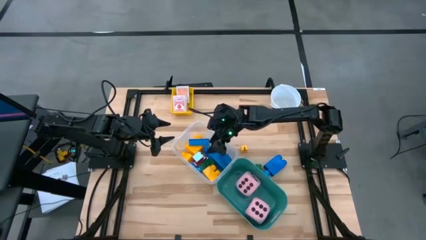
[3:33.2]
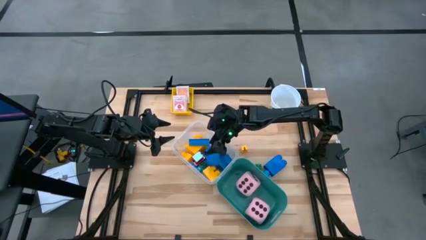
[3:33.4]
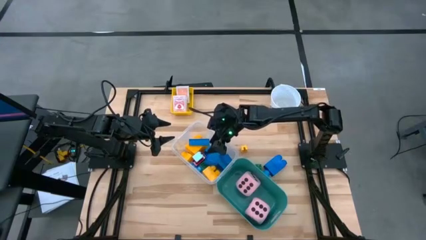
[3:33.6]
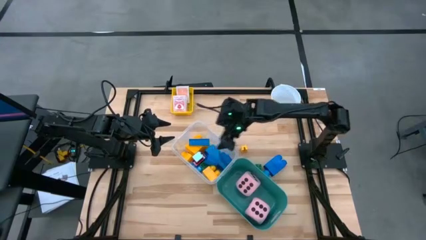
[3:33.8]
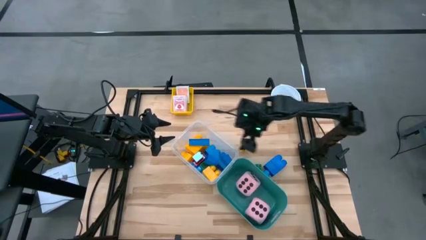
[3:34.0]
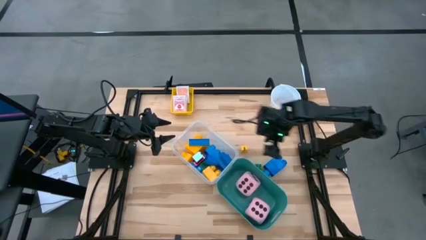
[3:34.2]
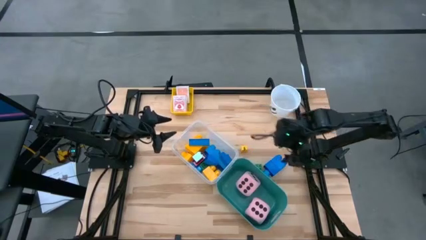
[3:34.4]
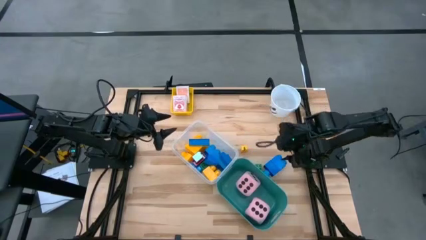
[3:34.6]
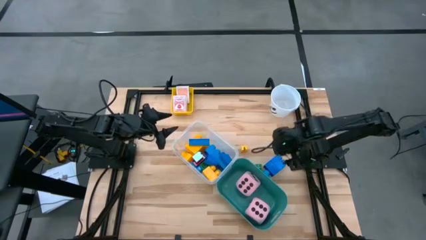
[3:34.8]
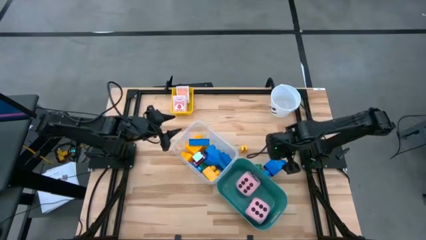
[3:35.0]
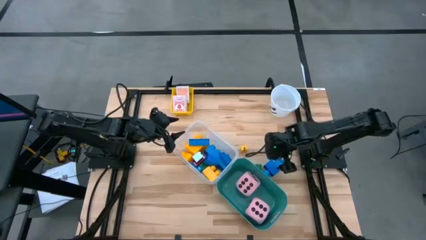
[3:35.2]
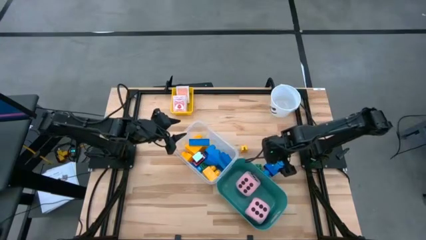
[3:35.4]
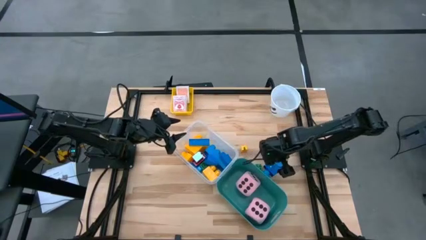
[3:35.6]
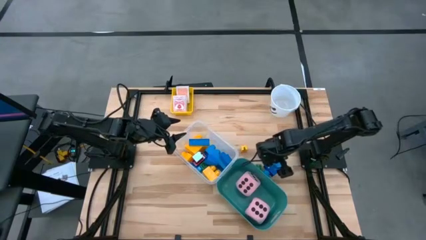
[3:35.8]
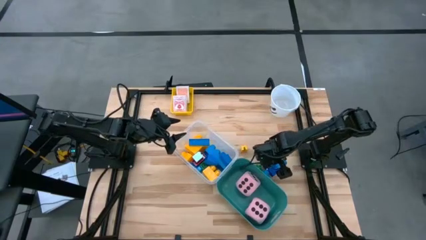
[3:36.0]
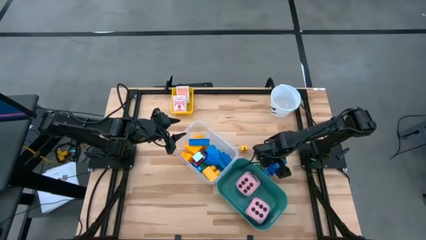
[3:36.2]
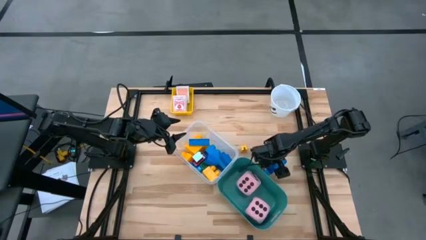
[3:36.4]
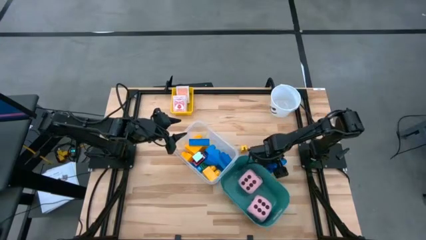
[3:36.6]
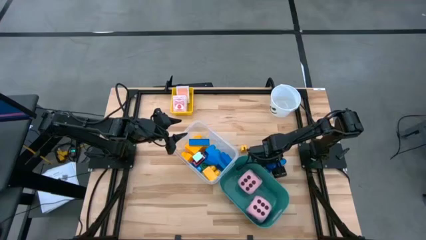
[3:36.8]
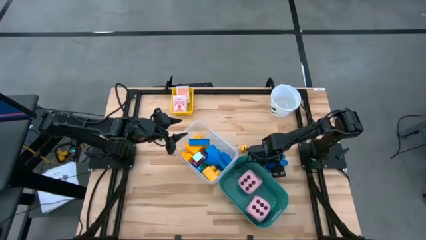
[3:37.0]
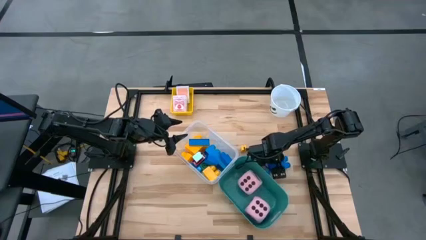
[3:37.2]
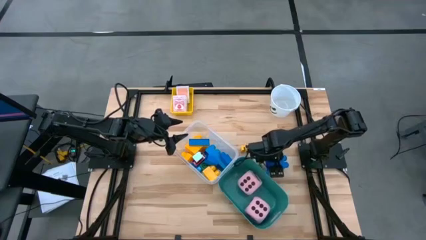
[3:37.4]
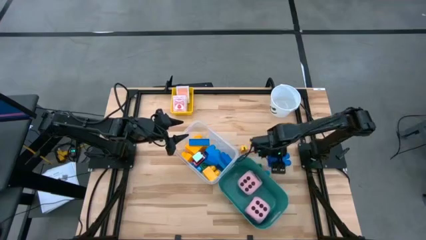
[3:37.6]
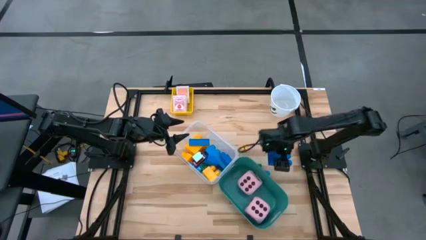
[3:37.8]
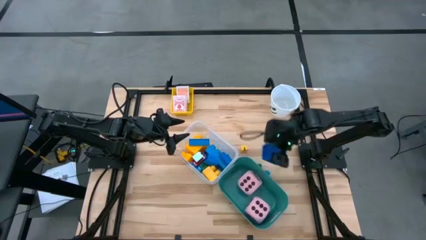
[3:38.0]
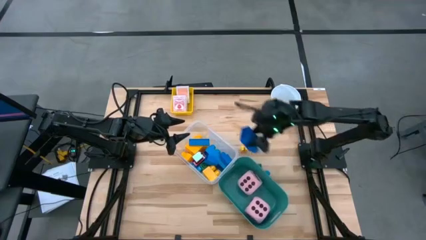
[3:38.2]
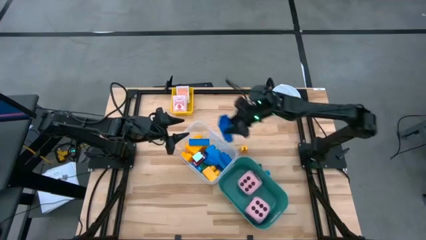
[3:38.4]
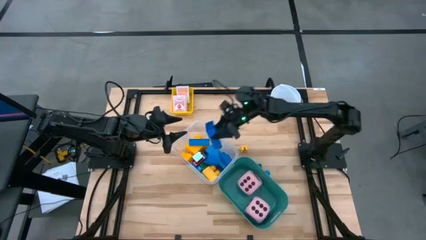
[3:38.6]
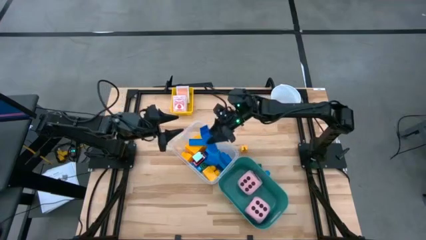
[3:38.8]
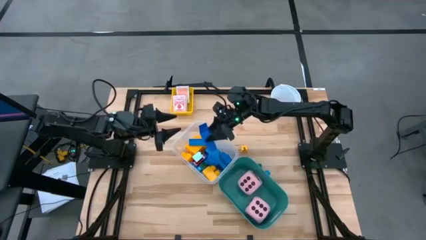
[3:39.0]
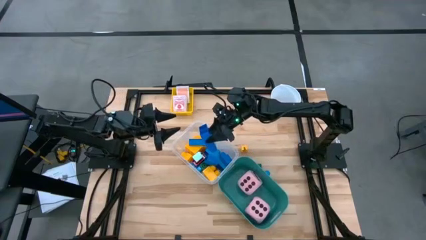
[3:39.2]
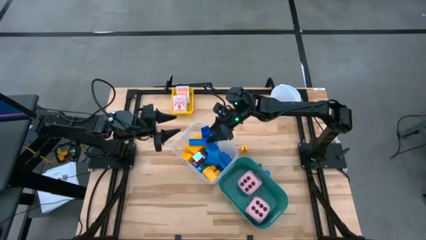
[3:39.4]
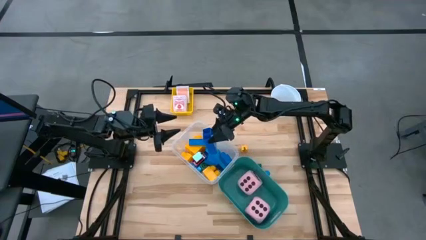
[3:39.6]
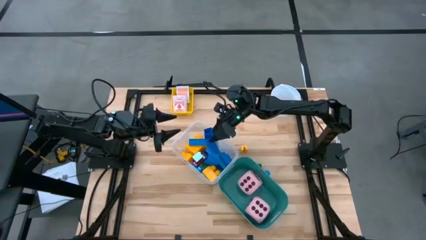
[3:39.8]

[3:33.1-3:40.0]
Task: Pick & Place Toys
Put the blue game pieces into the transparent bin

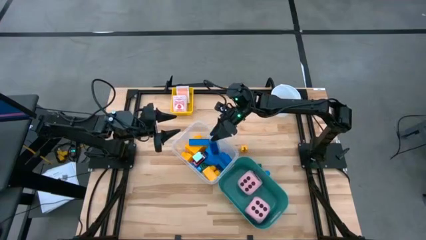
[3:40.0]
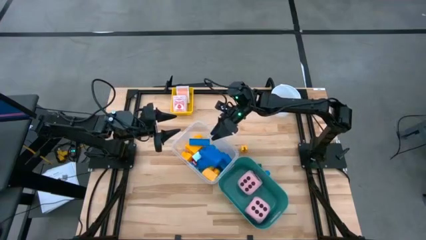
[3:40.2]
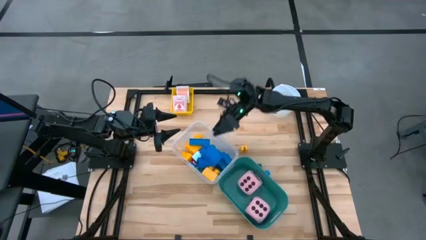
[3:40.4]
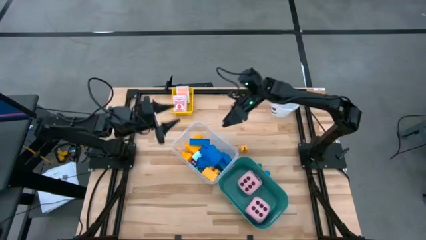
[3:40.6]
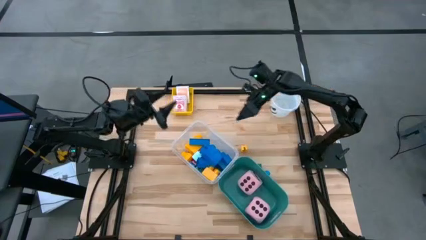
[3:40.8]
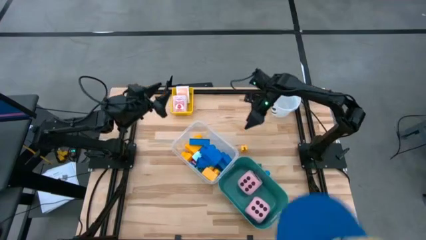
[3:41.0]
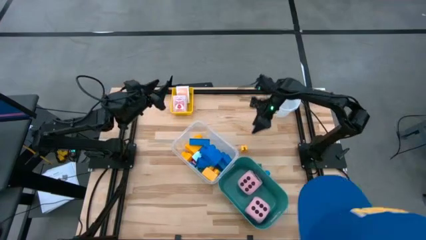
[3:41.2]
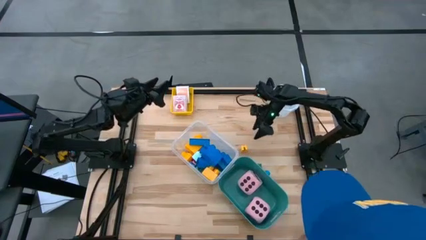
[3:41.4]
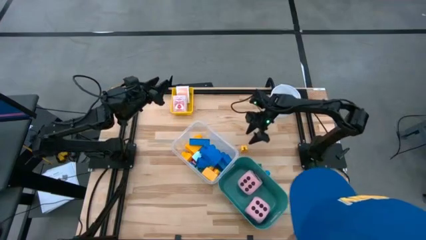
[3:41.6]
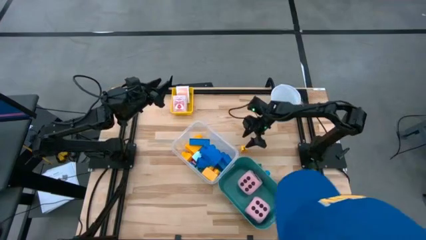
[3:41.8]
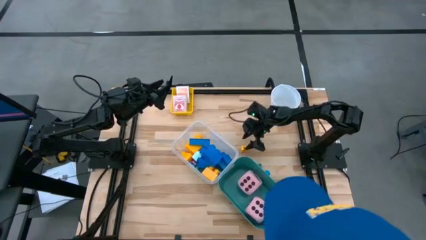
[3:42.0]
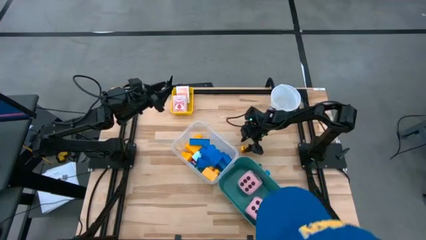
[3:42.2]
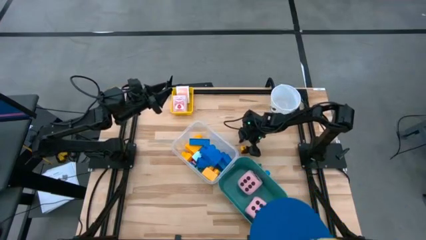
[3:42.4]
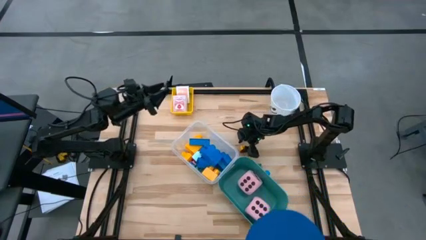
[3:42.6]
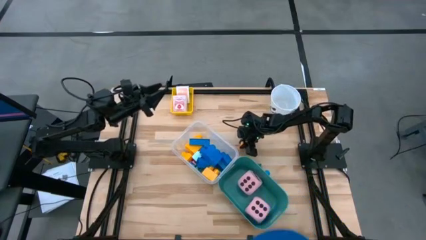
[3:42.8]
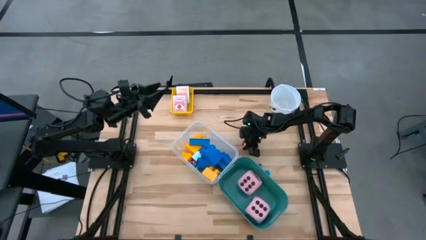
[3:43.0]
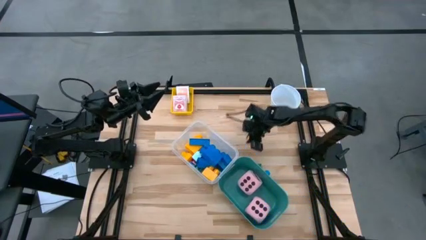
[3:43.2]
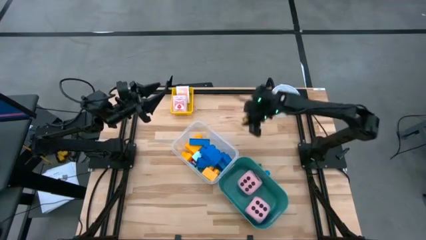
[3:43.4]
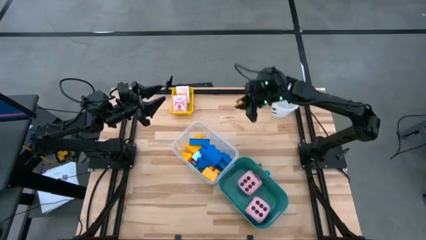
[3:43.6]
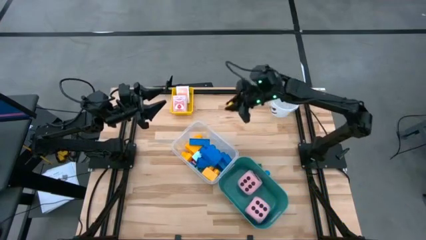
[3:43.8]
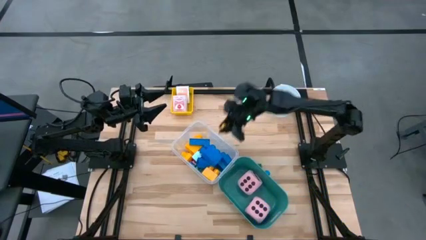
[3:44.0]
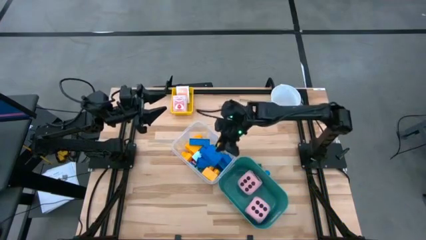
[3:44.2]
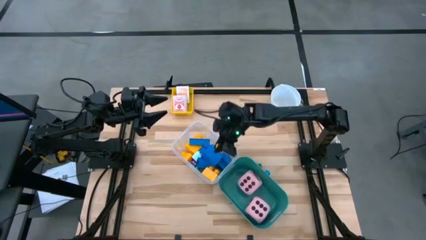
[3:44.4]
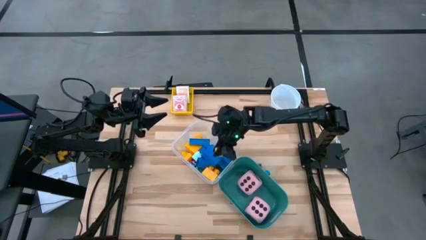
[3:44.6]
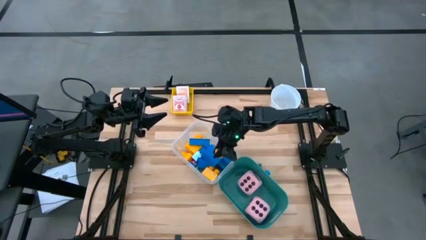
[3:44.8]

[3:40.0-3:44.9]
Put the yellow game piece into the transparent bin

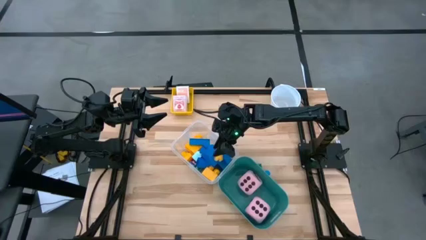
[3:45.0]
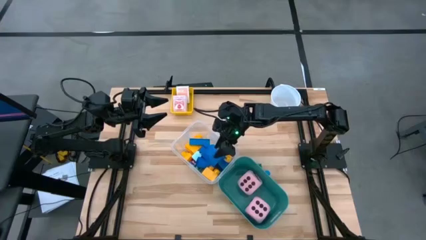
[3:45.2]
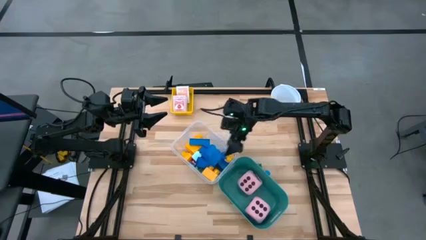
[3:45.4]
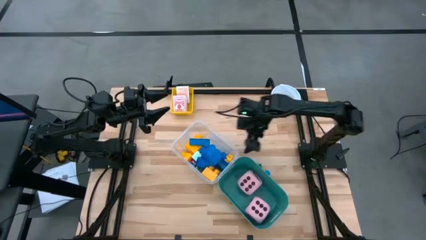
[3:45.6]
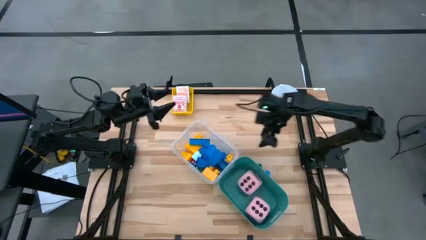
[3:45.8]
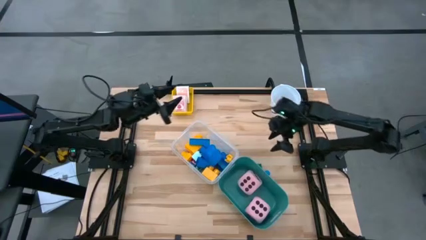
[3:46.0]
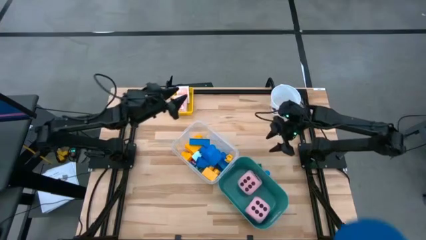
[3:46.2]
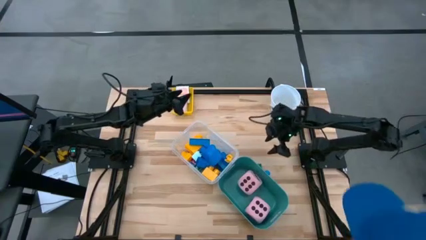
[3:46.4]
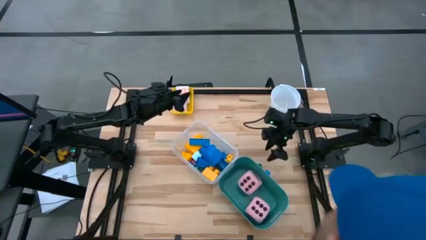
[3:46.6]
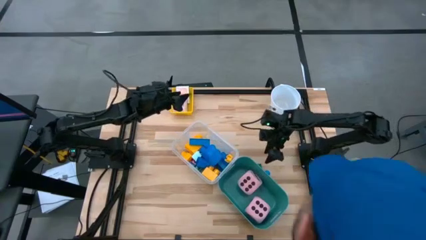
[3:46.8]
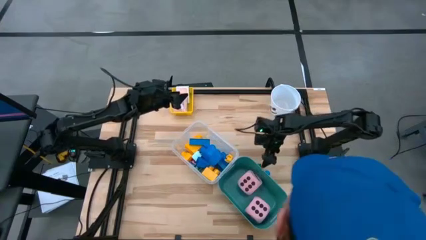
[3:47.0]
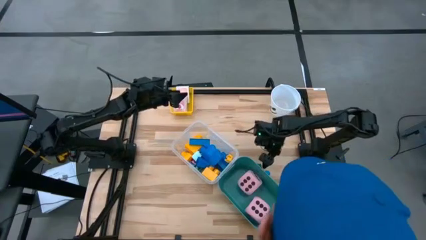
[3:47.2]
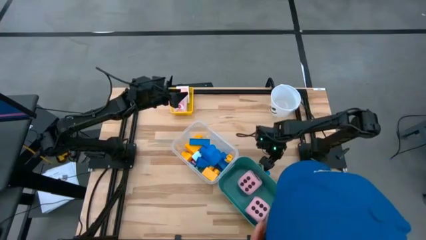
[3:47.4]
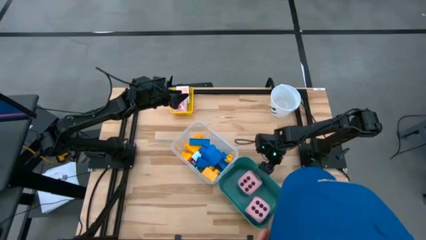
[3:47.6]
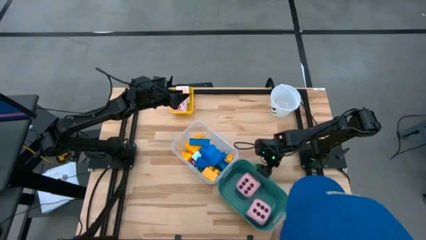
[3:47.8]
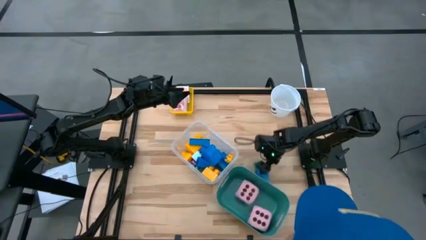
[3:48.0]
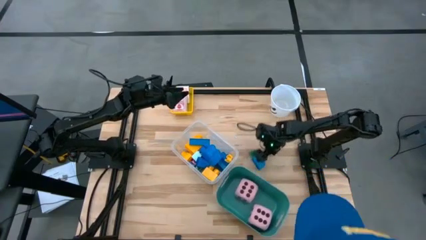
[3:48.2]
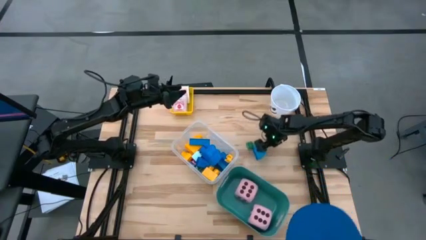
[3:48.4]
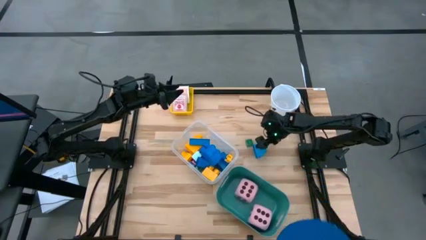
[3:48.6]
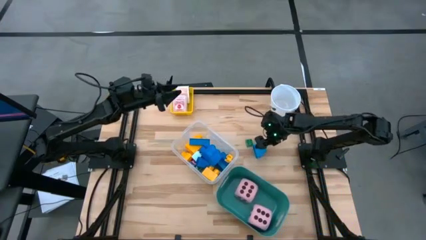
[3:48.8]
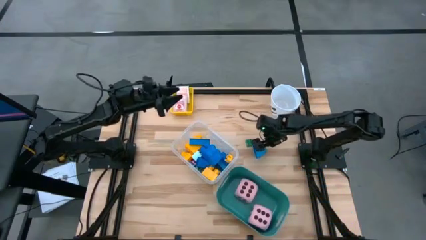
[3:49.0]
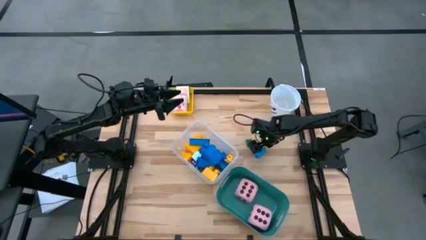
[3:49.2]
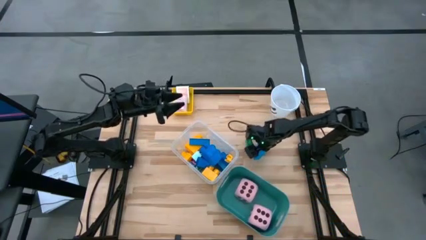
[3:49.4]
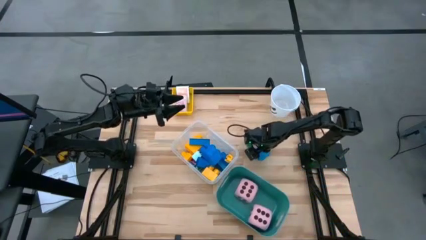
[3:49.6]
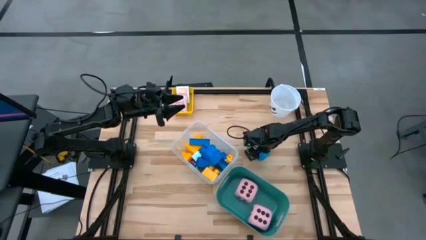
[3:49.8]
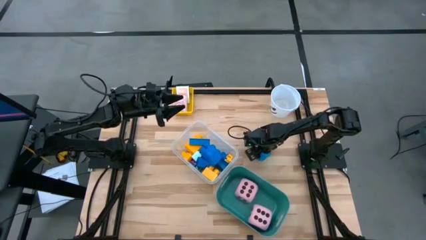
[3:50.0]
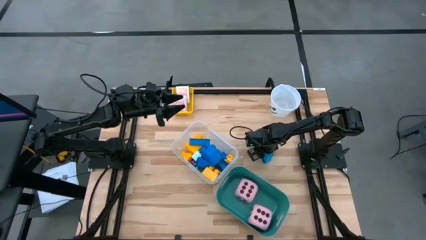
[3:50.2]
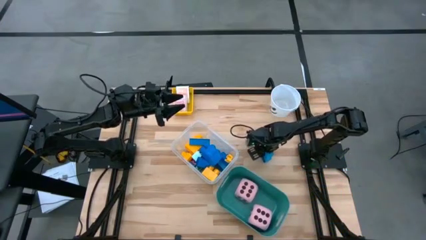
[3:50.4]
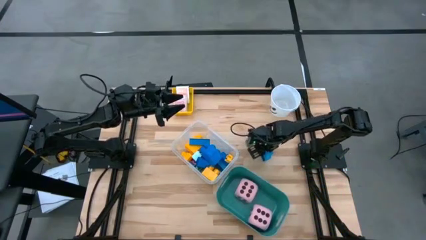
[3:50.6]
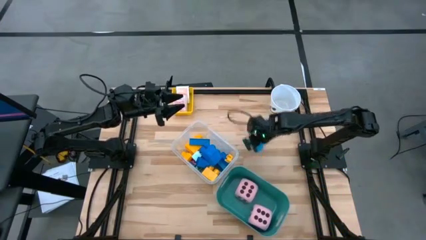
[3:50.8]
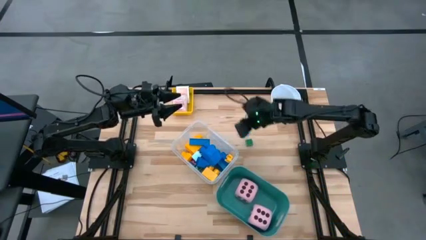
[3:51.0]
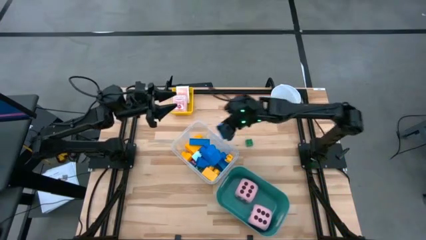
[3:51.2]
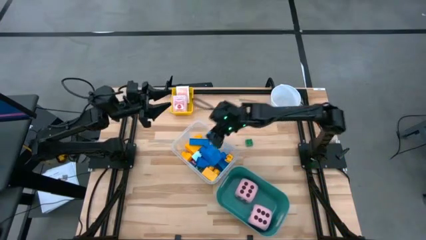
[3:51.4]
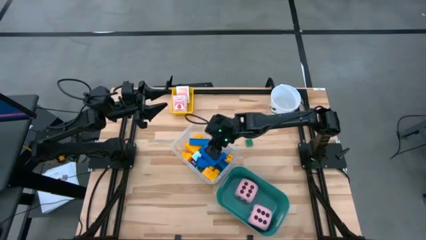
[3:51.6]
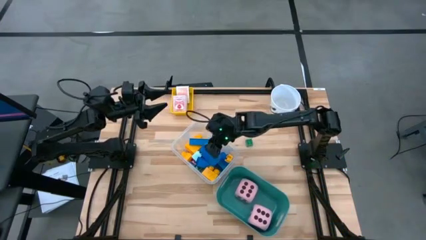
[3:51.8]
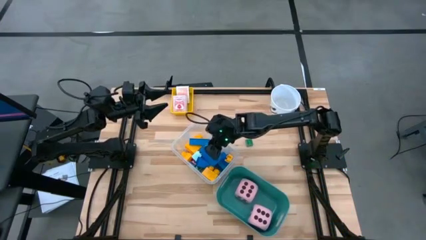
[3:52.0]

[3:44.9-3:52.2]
Put the blue game piece into the transparent bin
